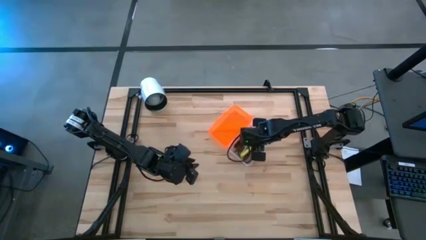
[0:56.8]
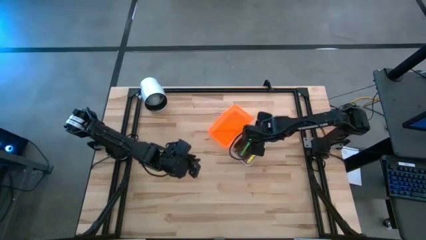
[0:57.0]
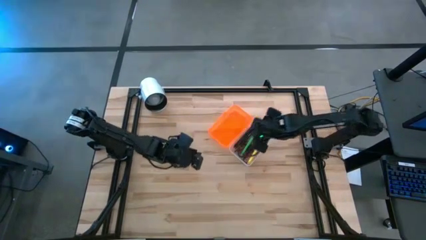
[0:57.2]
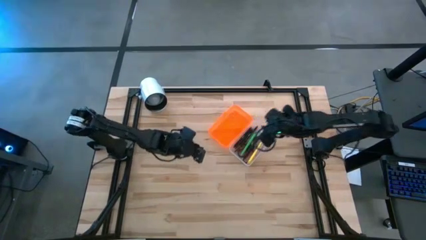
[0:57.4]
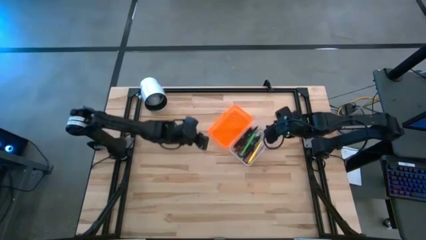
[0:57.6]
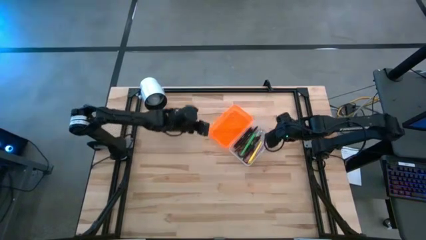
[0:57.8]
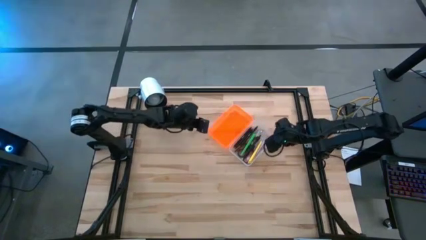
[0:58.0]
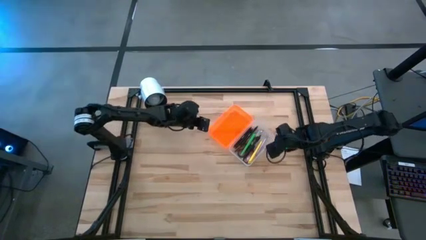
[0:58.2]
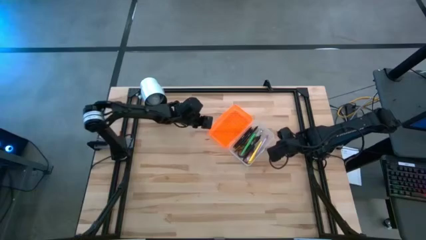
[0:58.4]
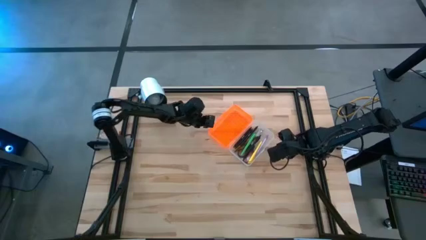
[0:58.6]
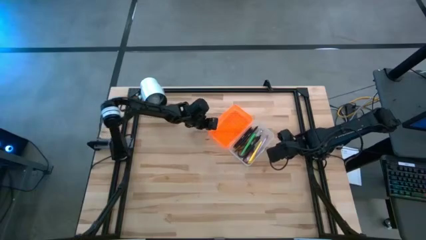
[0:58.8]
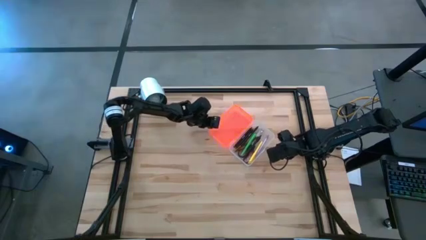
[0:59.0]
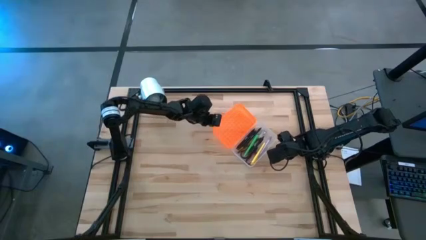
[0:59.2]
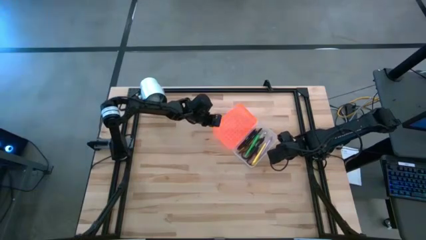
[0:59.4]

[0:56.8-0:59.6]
Task: Pick & place school supplies into a supply box
Close the orange supply box

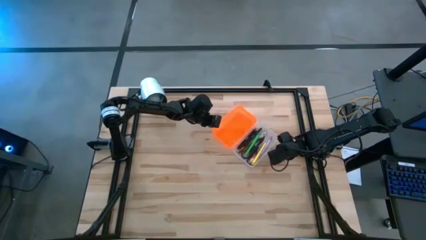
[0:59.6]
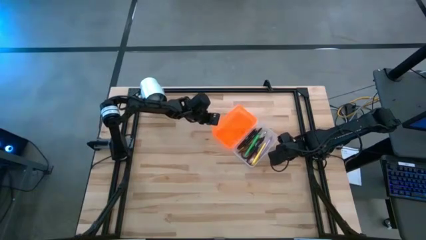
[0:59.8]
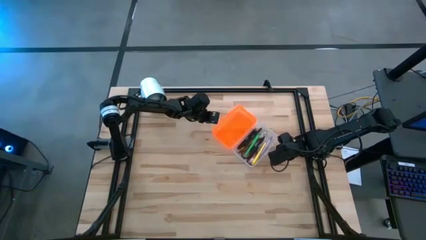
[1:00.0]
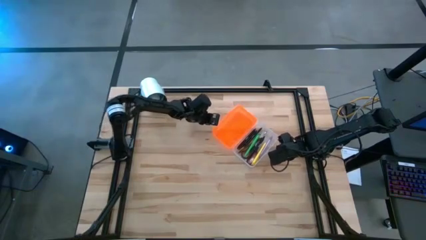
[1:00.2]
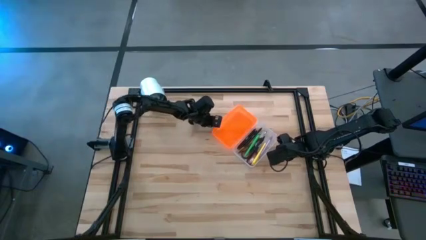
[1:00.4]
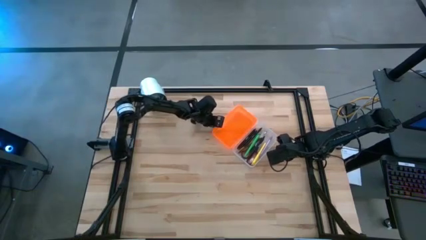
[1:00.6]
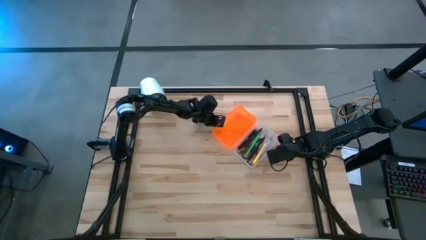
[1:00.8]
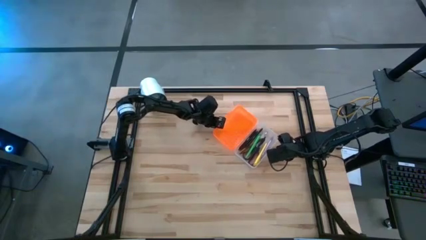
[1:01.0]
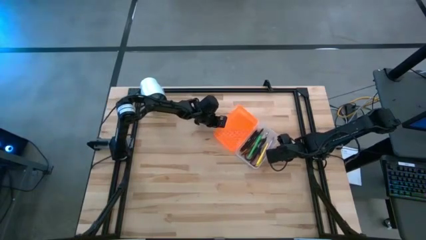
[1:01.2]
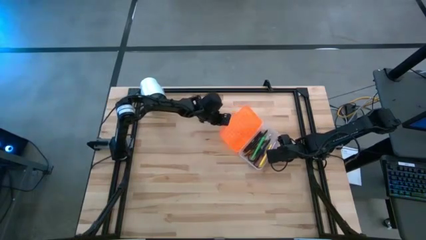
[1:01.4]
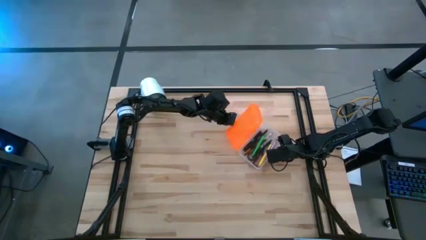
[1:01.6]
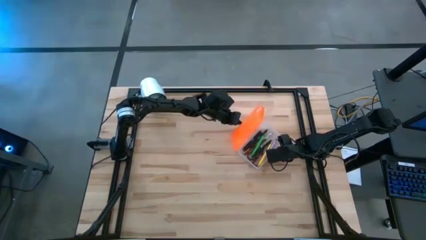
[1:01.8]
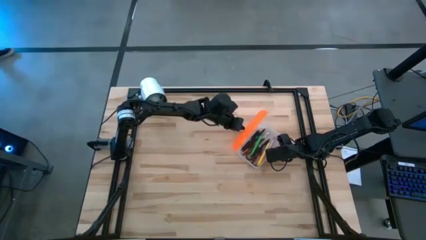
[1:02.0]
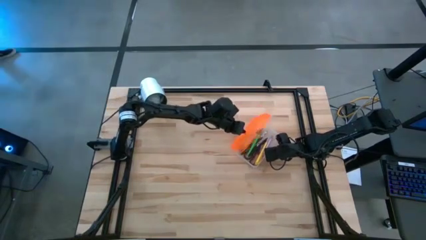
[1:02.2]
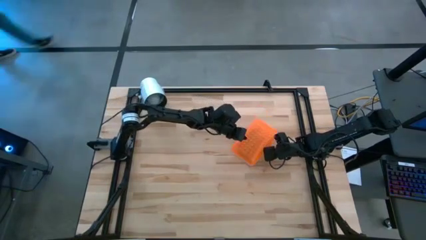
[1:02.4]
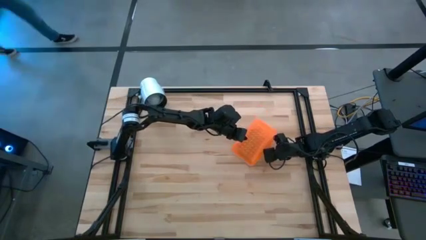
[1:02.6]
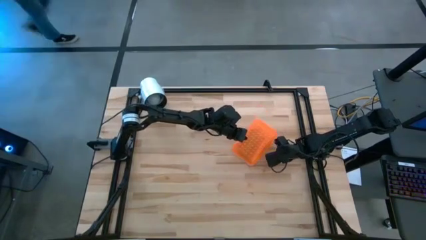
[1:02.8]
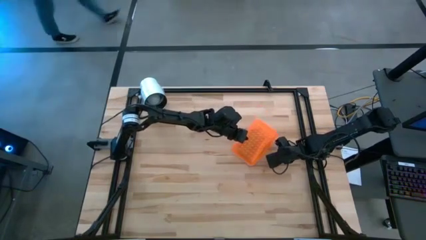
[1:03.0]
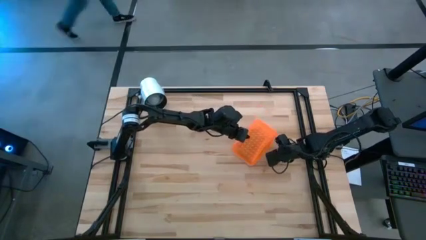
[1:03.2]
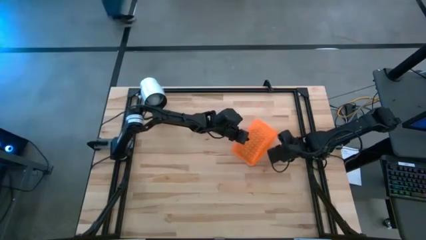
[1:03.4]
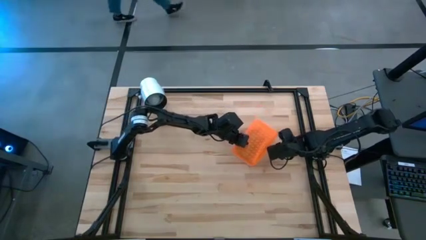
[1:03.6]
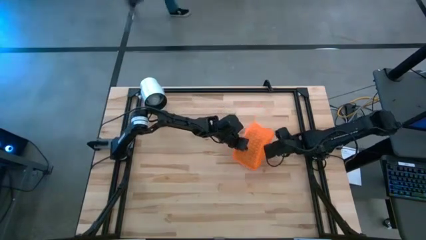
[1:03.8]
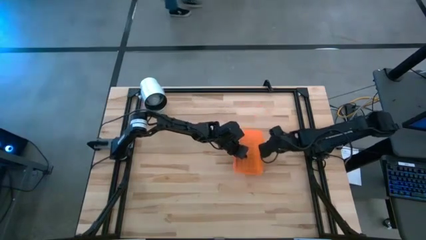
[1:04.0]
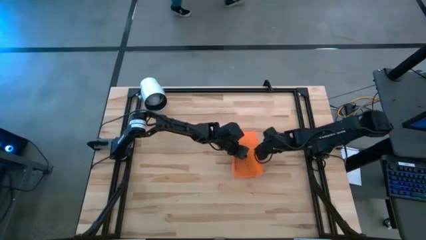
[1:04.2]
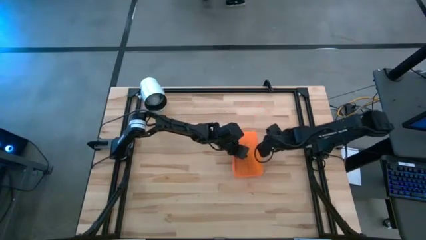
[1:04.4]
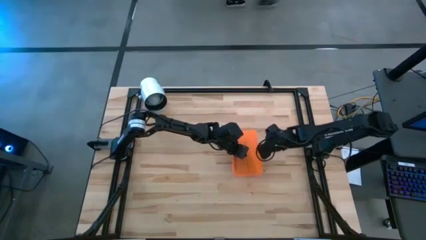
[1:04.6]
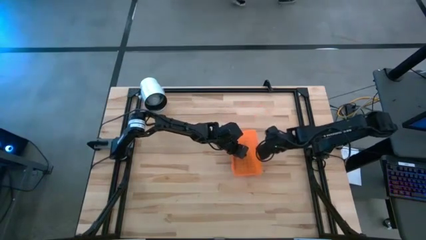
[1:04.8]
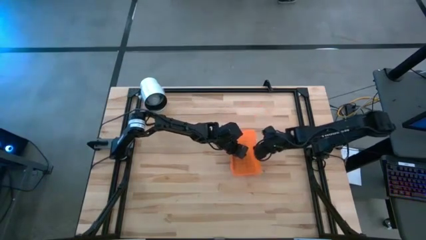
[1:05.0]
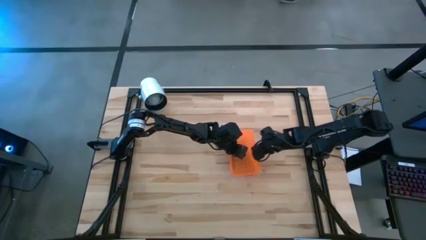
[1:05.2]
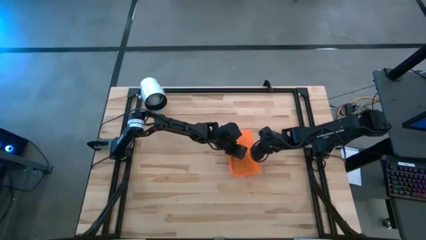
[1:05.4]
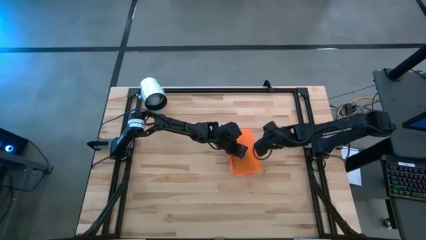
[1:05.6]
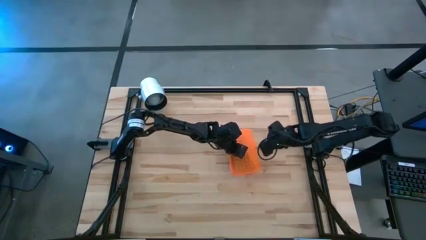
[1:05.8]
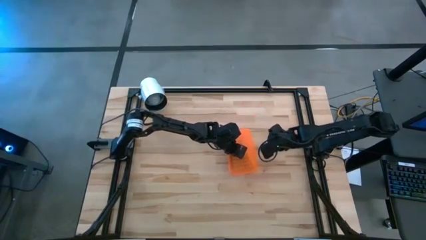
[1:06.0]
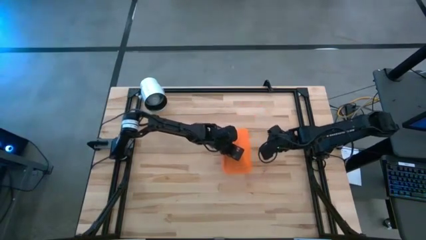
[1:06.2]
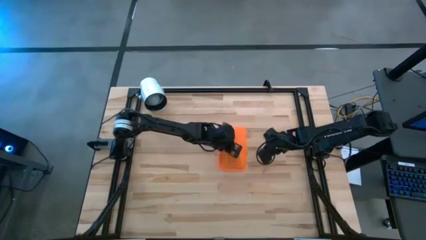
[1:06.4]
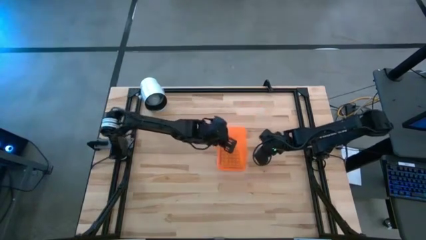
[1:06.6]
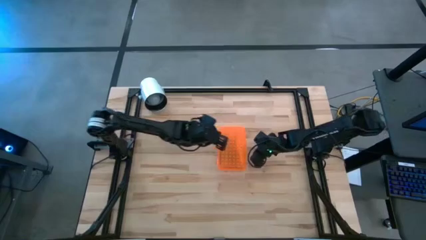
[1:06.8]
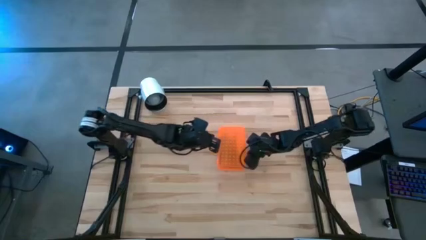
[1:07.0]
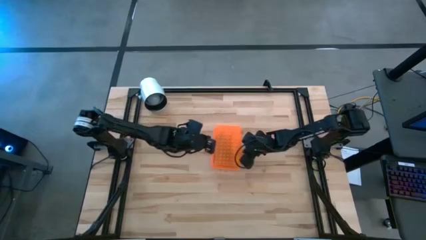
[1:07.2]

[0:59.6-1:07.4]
Close the orange supply box

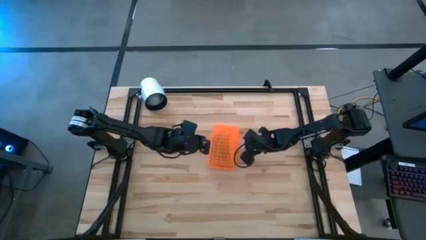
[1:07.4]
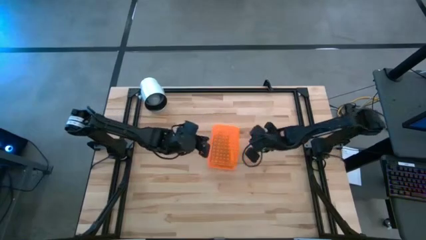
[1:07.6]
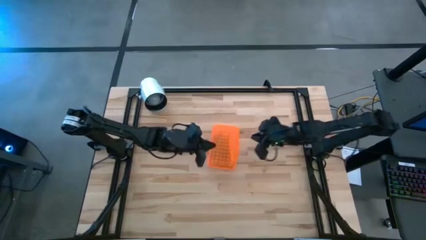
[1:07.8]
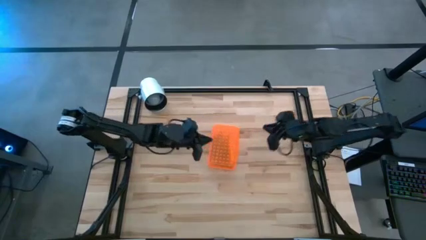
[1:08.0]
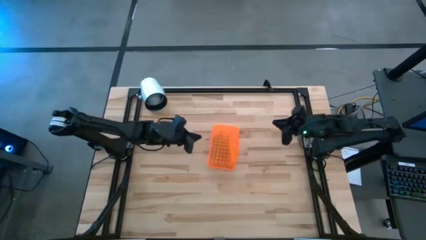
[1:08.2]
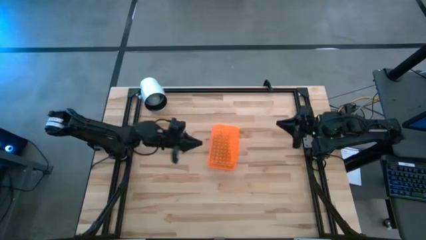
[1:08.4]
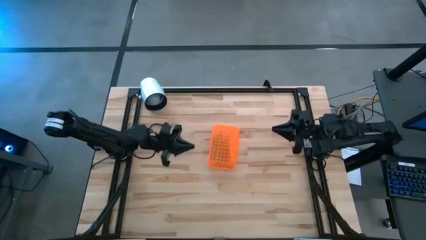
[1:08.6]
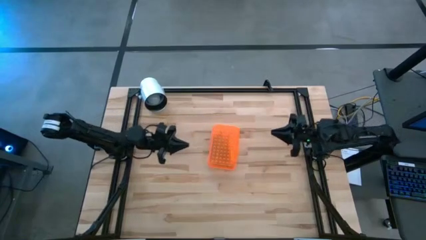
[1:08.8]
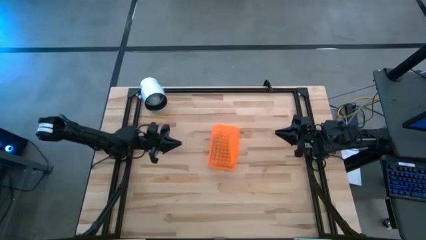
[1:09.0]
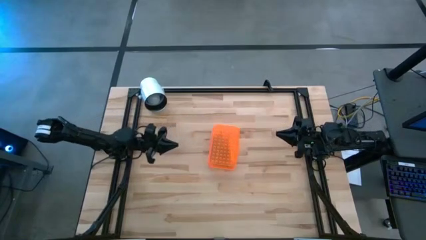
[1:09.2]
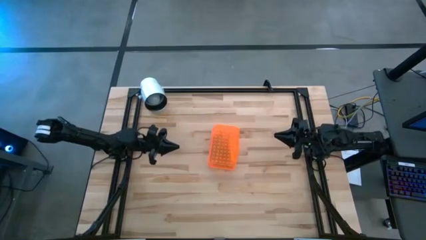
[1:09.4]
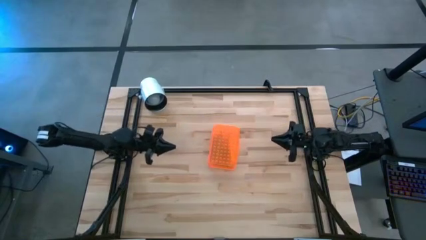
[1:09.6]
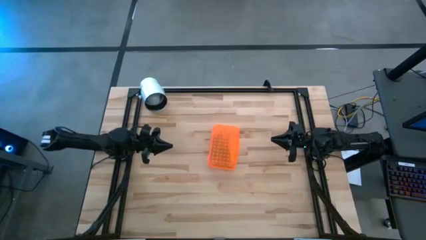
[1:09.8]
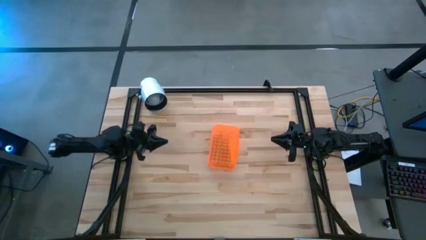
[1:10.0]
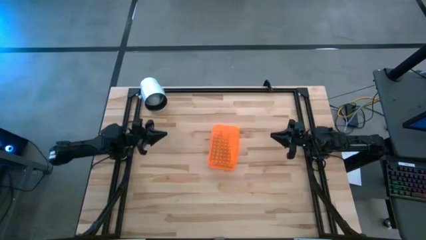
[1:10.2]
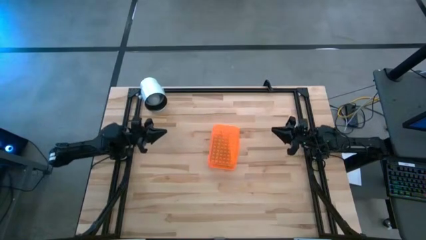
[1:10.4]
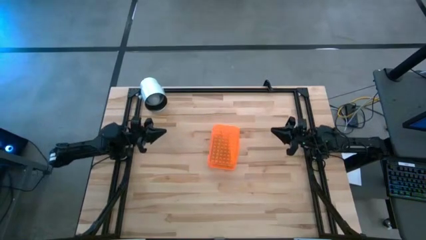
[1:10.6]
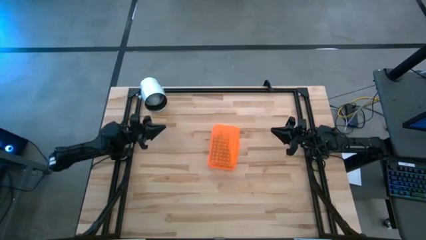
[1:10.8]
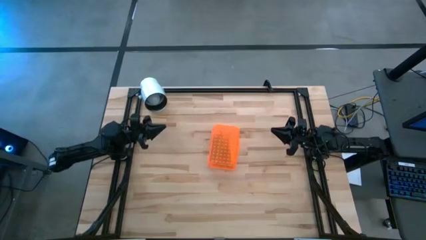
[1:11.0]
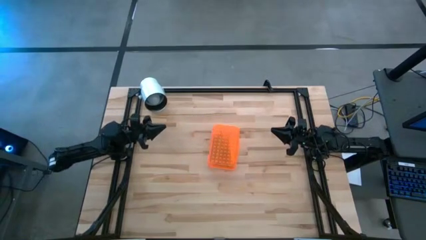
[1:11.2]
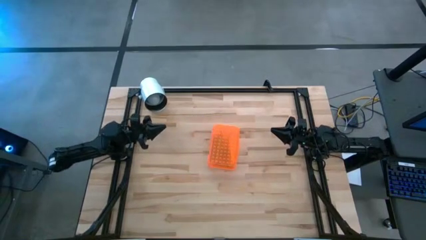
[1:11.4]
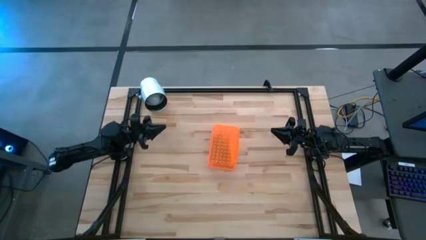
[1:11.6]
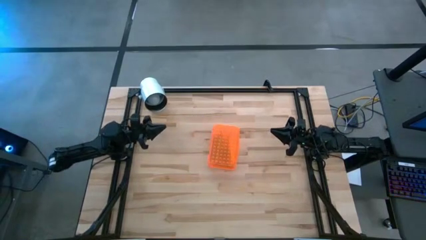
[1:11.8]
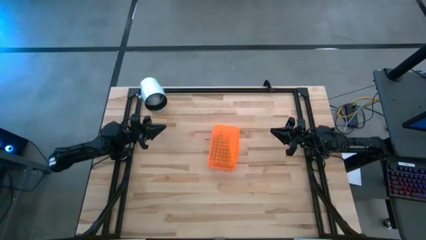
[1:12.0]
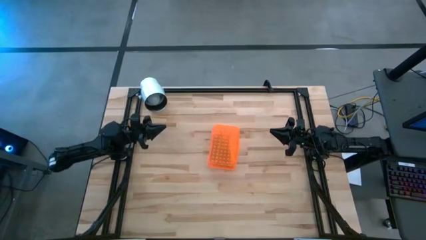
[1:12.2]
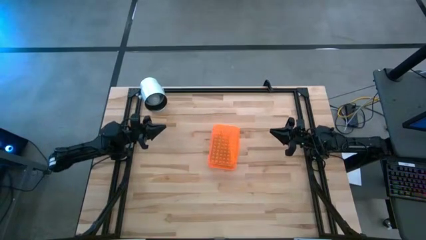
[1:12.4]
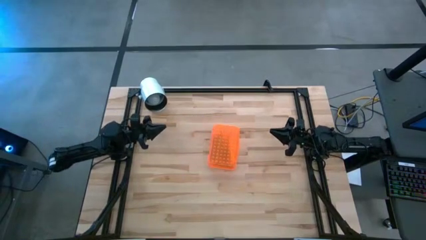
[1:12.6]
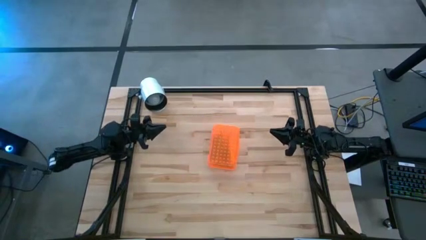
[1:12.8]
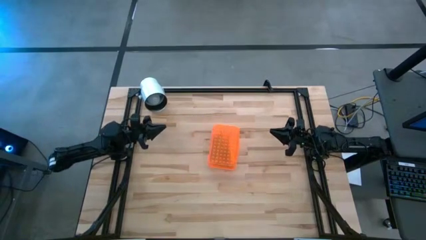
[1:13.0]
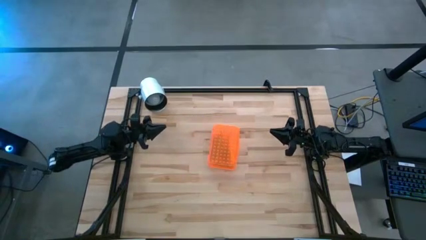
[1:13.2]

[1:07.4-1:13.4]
Return to Home Position
